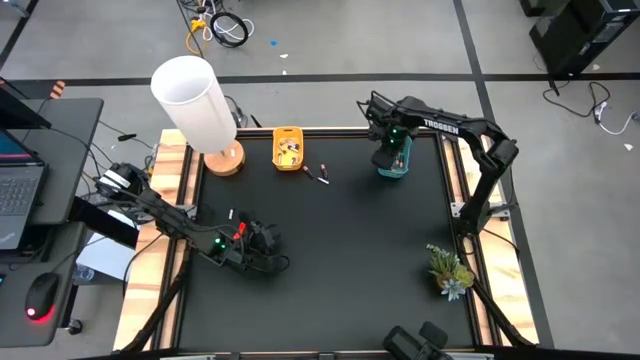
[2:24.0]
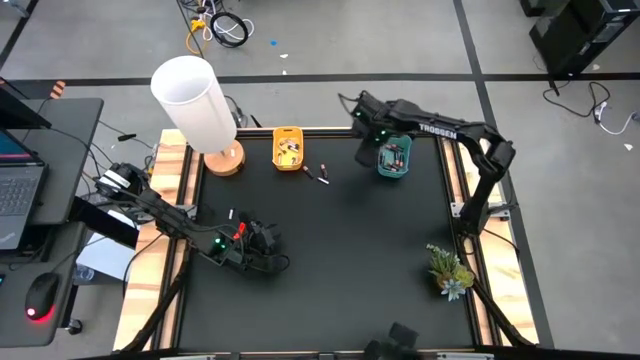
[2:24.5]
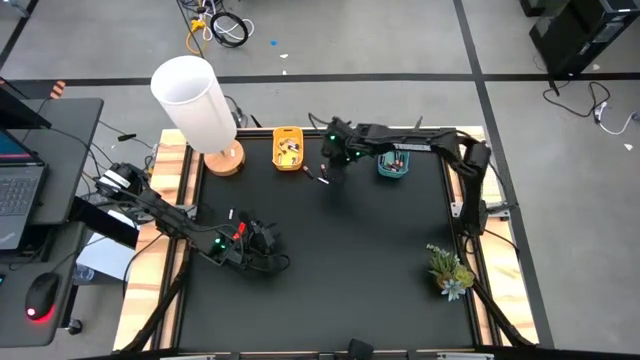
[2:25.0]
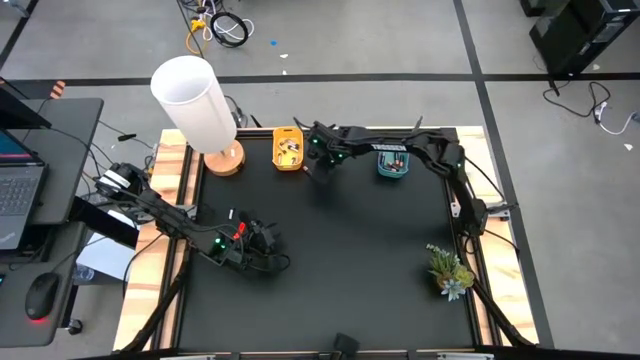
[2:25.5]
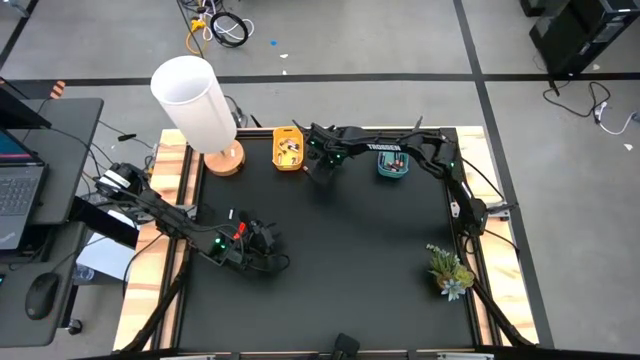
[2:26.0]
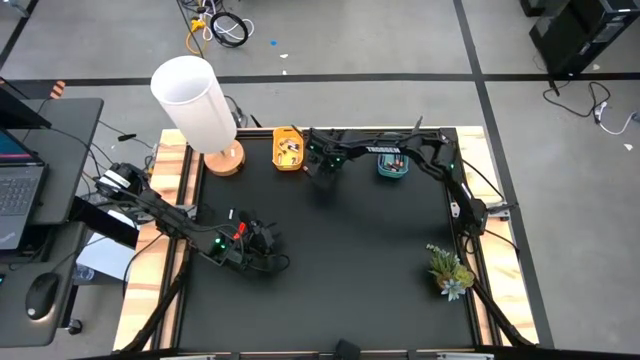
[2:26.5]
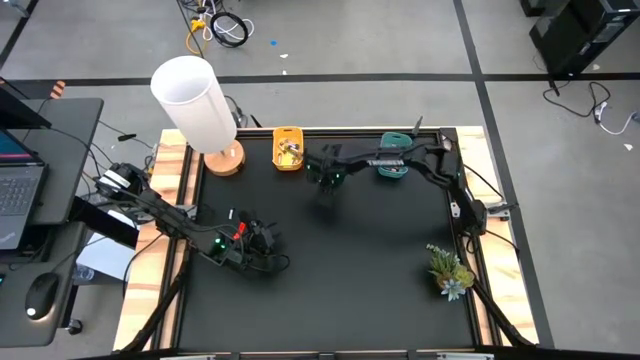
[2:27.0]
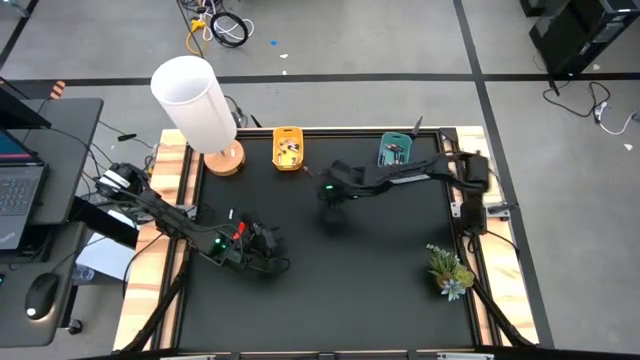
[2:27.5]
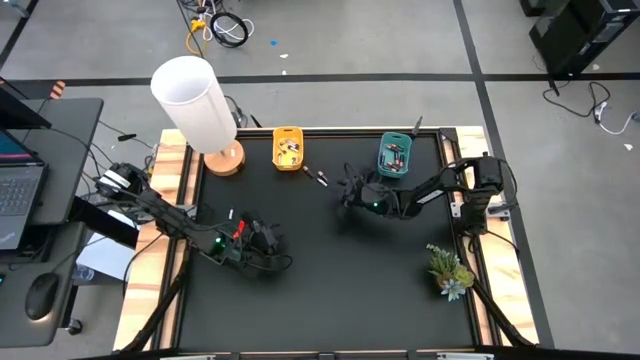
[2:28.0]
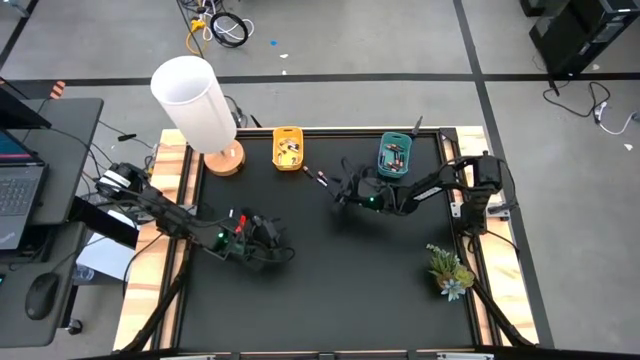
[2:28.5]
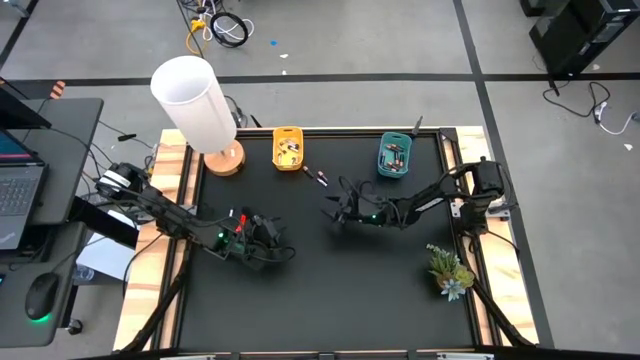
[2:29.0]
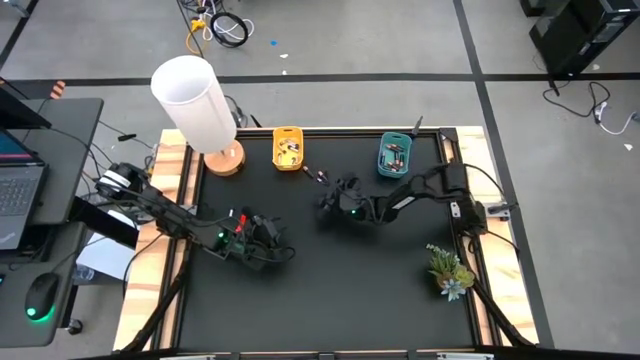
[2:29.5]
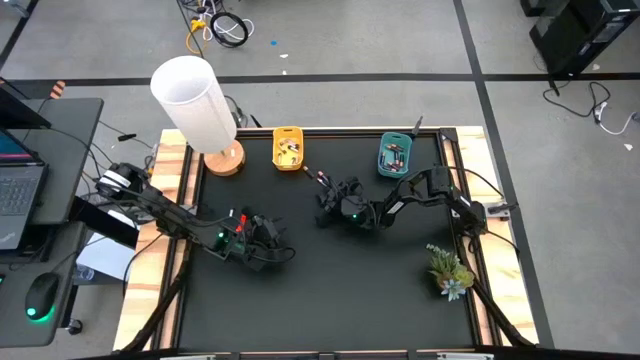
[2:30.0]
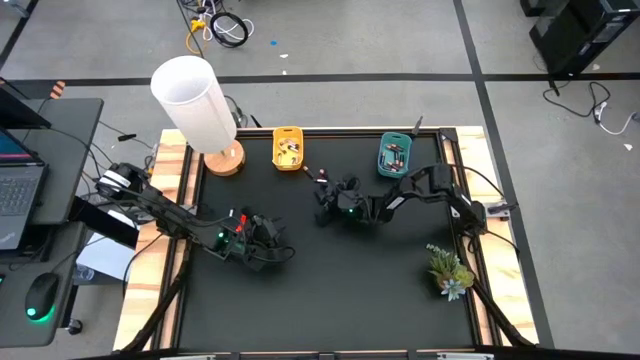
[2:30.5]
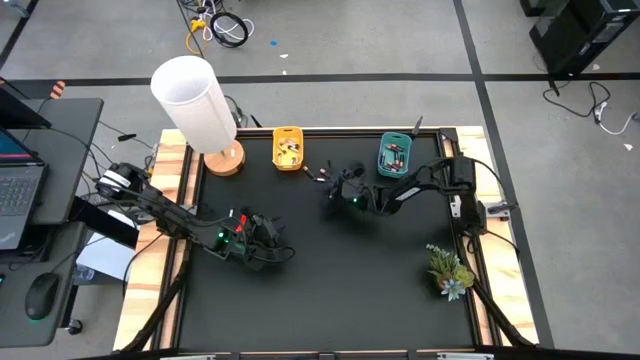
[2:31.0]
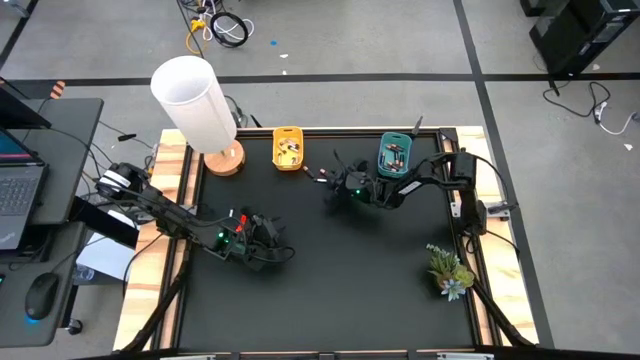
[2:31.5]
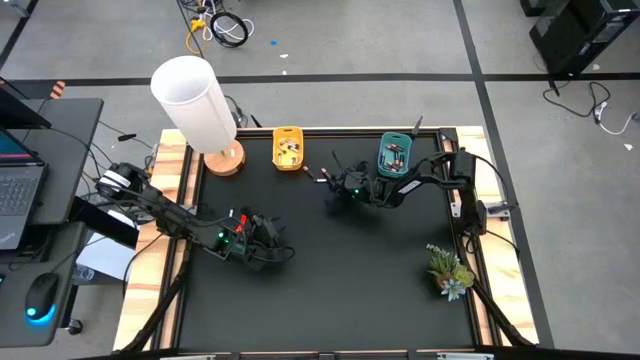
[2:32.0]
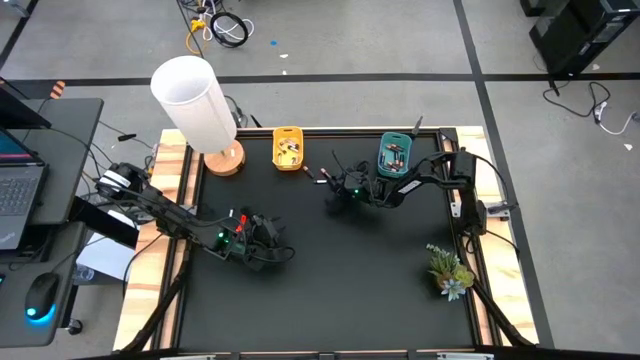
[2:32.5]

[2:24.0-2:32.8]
Task: Sort batteries
Put the black battery into the blue bin

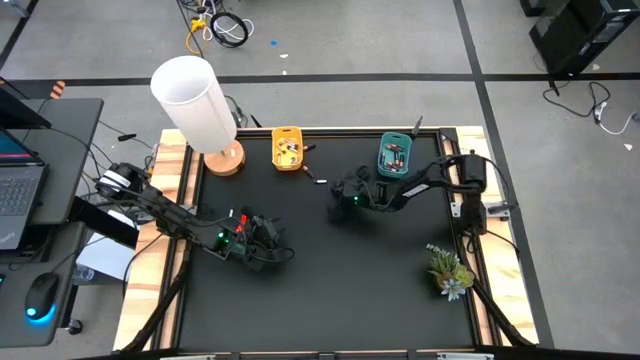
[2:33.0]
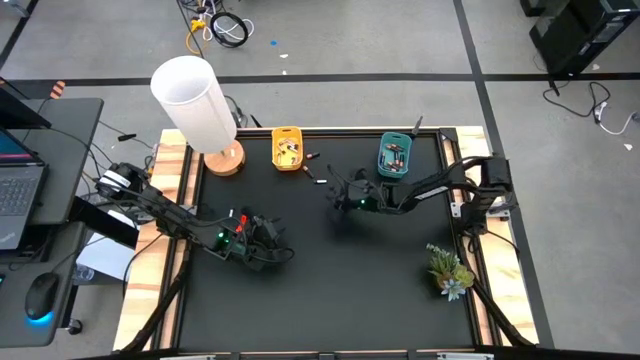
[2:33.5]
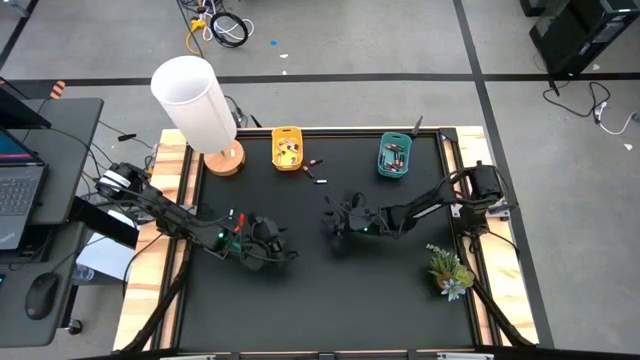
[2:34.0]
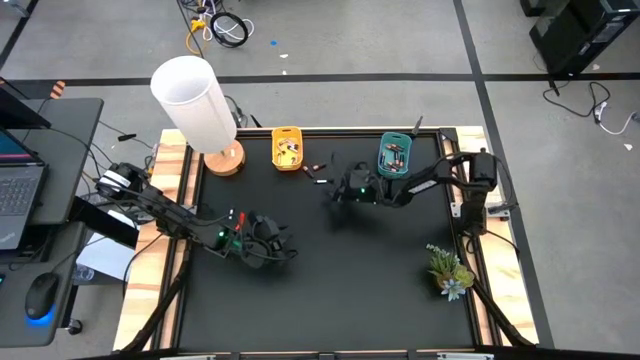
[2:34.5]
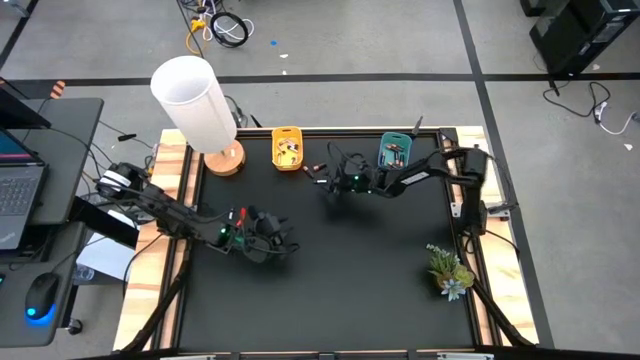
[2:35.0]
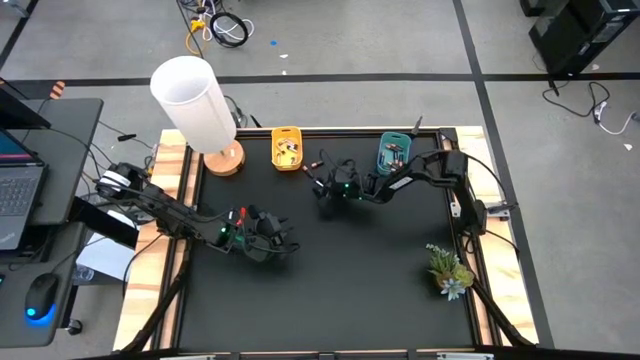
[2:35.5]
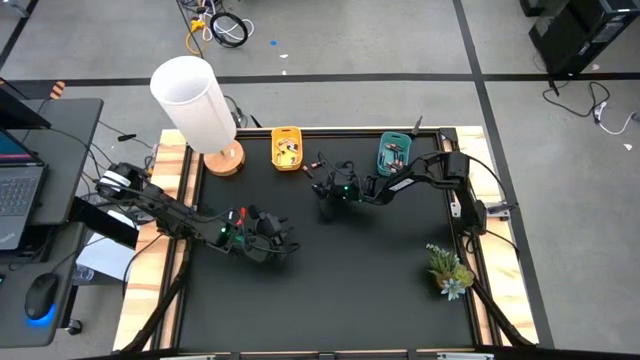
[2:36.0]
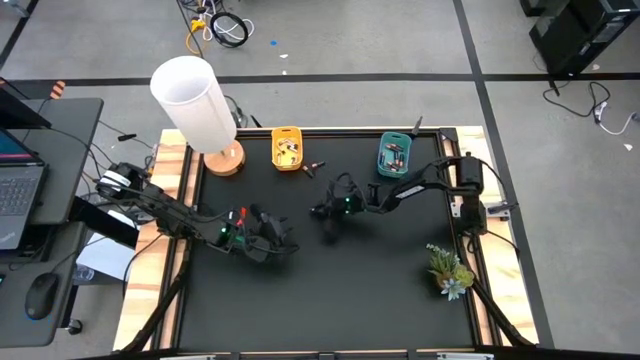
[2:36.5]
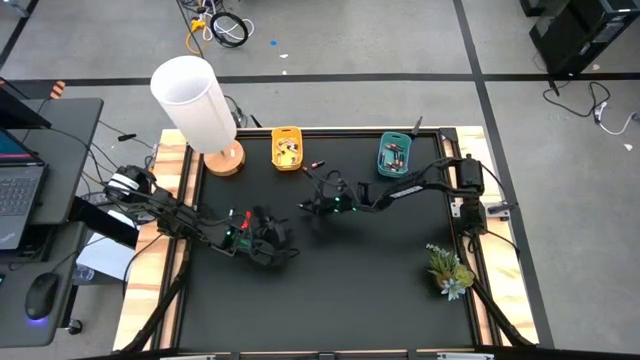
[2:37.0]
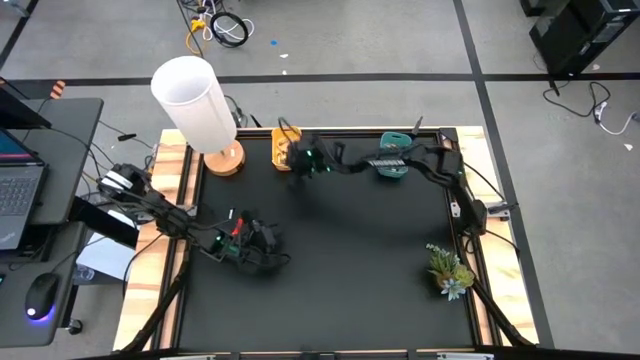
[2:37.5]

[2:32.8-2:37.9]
Put the silver battery into the yellow bin

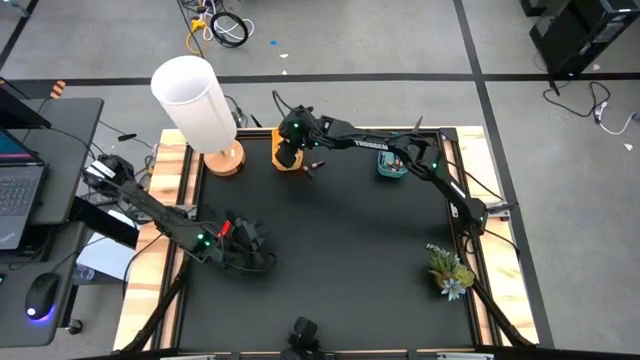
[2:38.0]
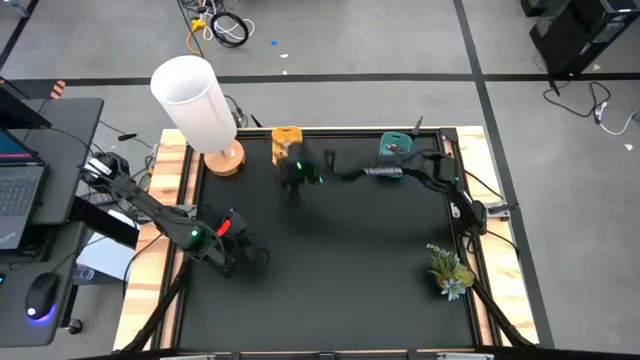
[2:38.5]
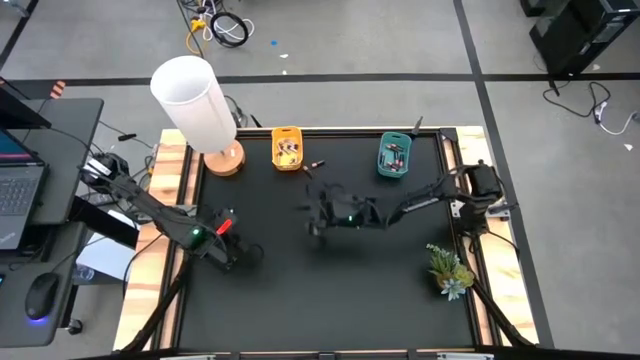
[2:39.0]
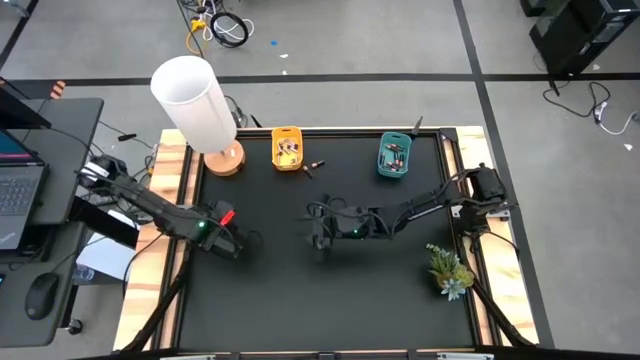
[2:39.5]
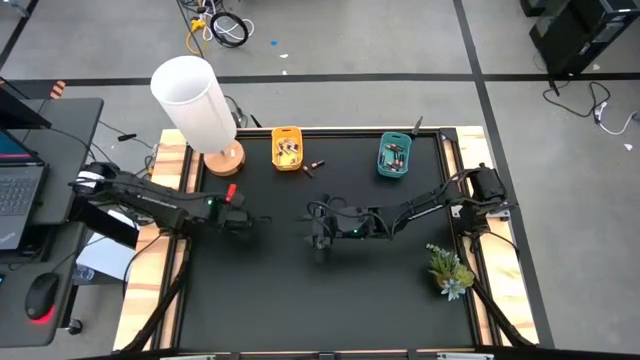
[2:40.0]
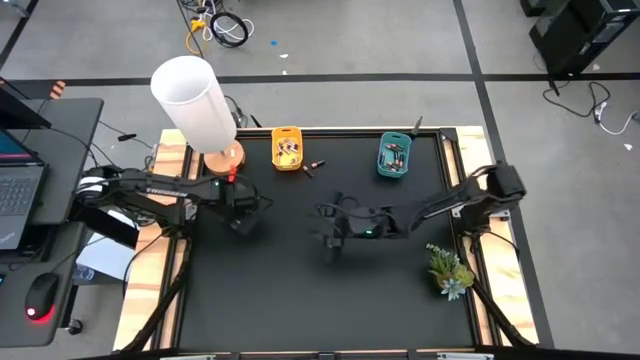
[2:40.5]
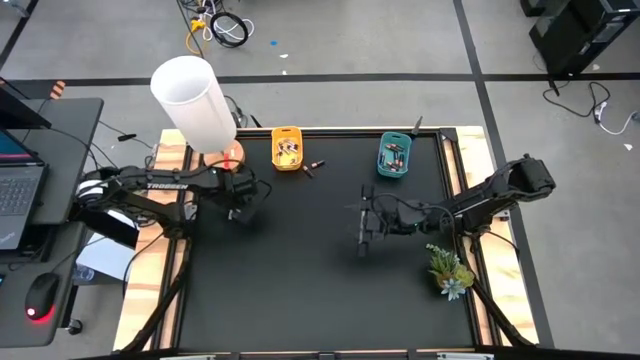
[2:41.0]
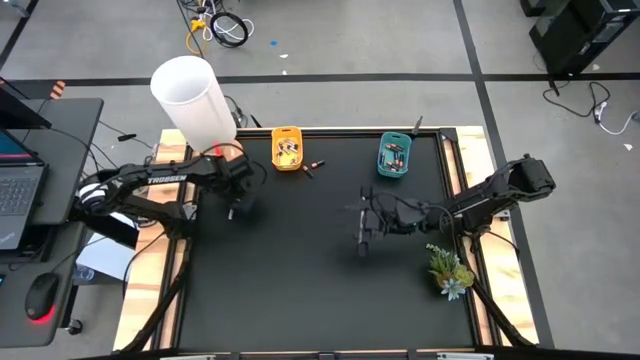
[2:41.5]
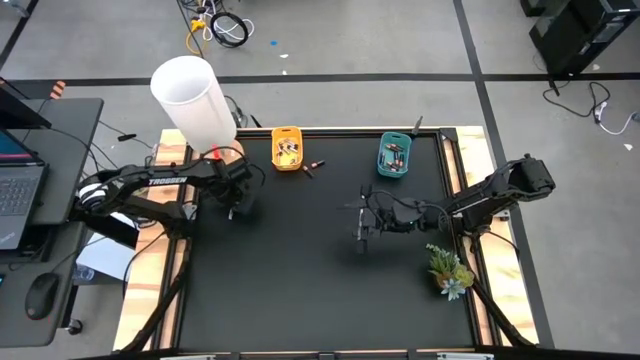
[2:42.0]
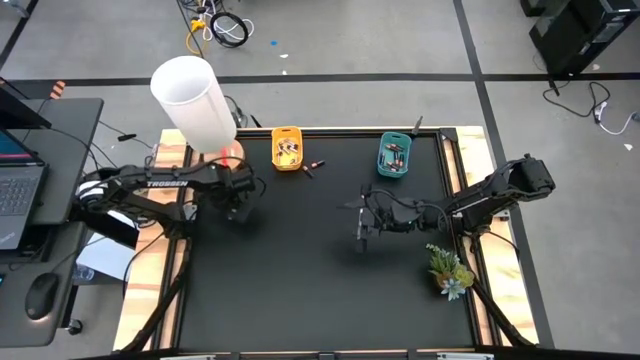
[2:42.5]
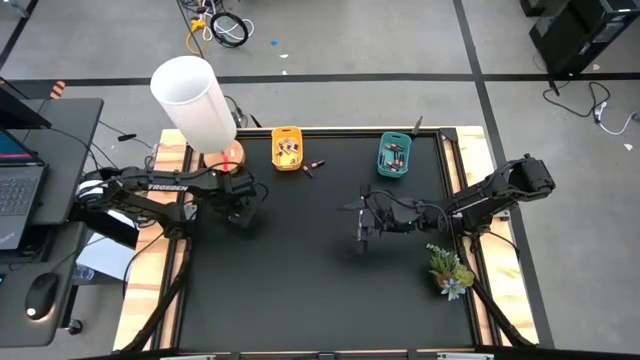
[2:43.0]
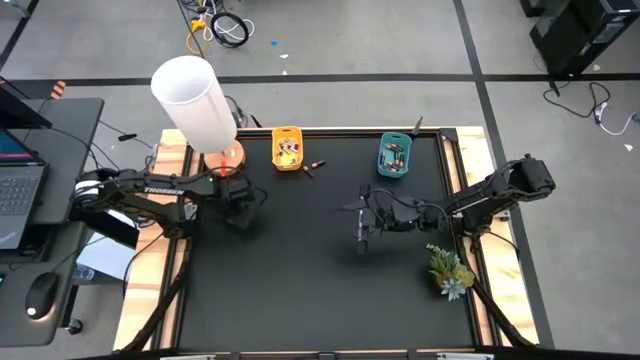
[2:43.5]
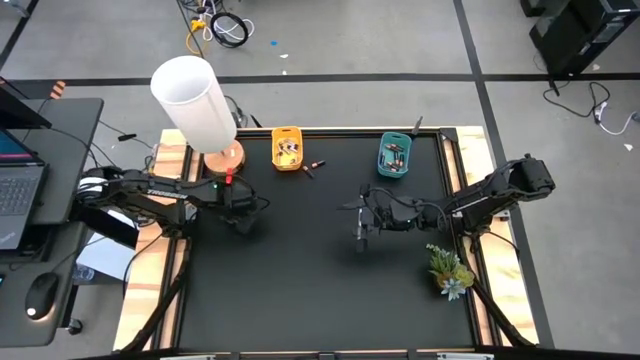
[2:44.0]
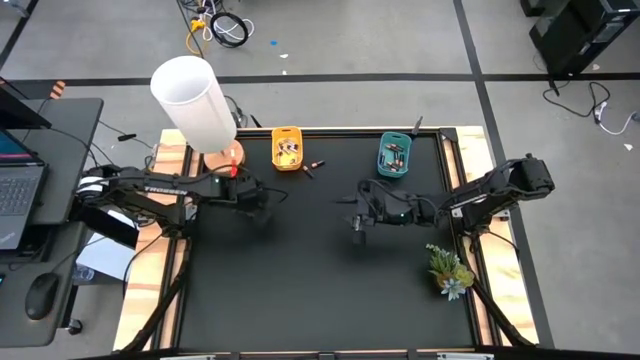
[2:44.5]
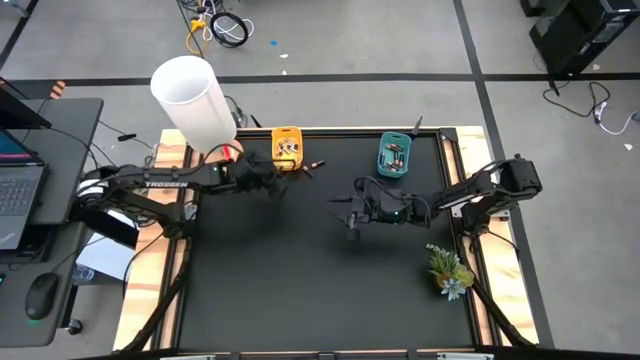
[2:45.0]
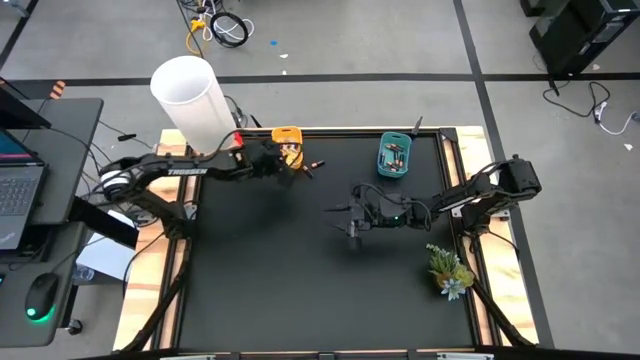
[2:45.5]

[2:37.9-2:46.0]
Put the silver battery into the yellow bin
